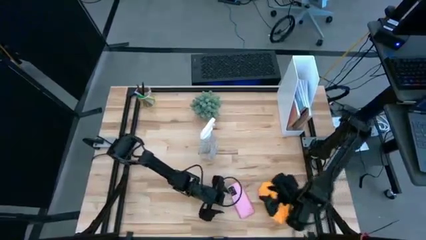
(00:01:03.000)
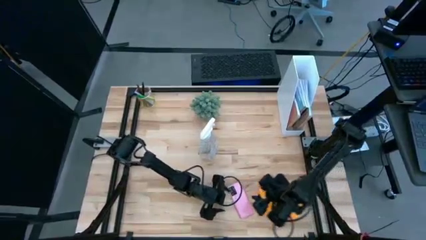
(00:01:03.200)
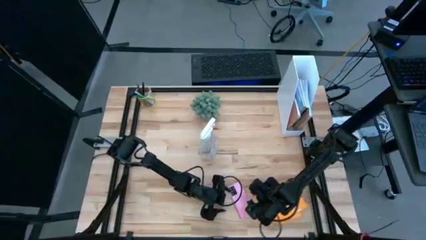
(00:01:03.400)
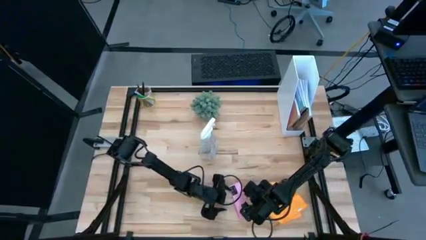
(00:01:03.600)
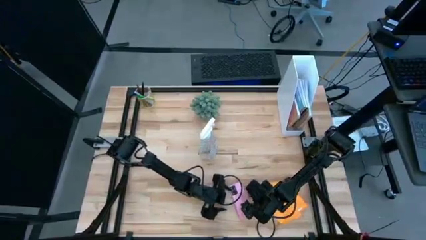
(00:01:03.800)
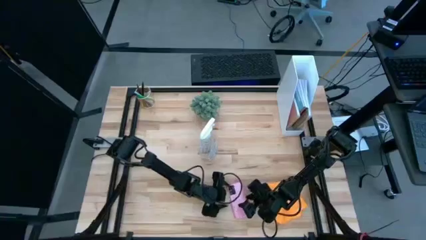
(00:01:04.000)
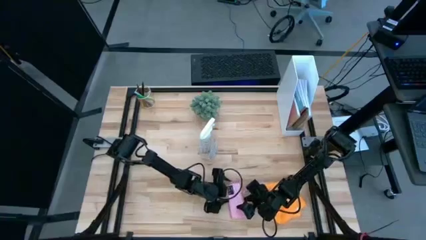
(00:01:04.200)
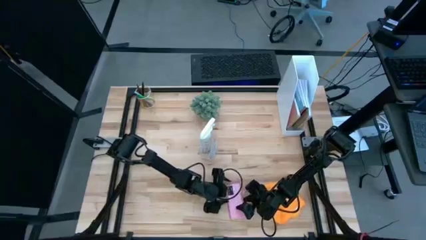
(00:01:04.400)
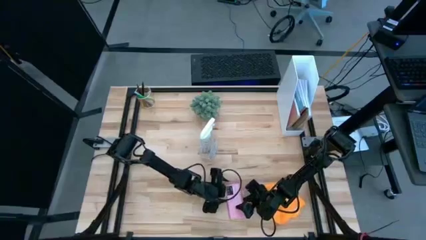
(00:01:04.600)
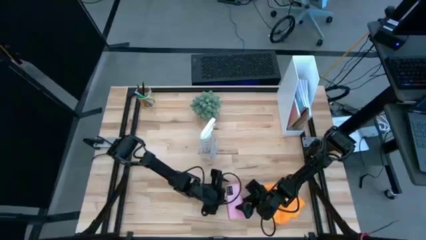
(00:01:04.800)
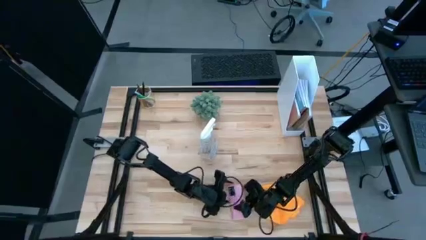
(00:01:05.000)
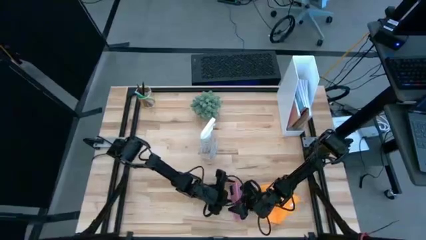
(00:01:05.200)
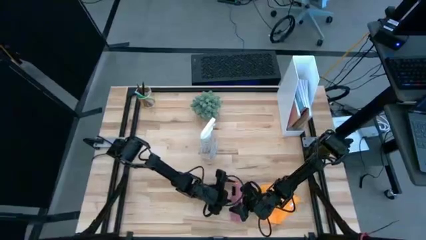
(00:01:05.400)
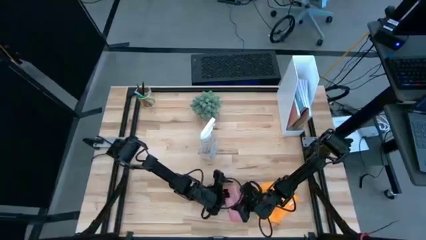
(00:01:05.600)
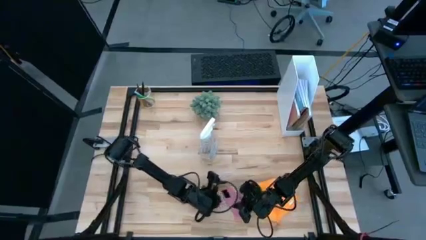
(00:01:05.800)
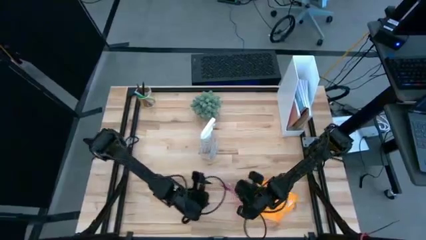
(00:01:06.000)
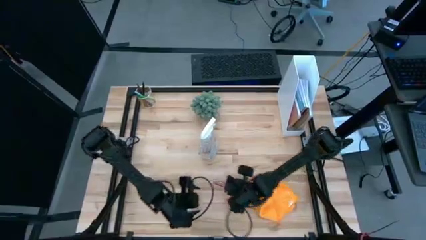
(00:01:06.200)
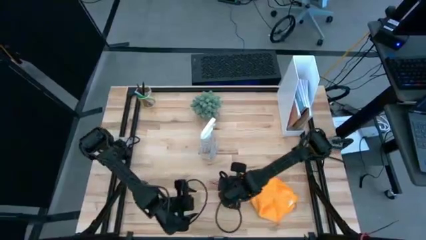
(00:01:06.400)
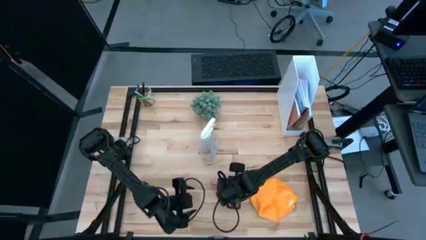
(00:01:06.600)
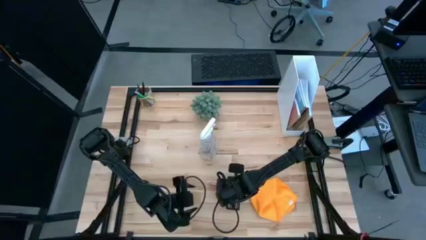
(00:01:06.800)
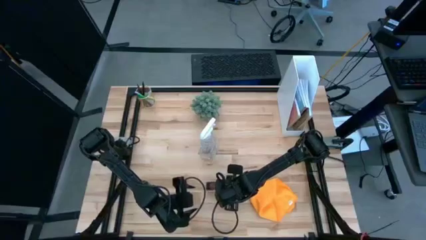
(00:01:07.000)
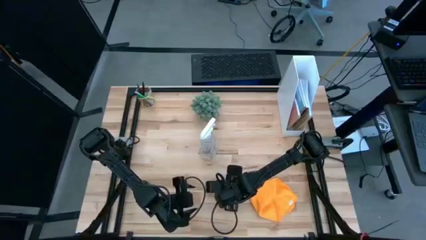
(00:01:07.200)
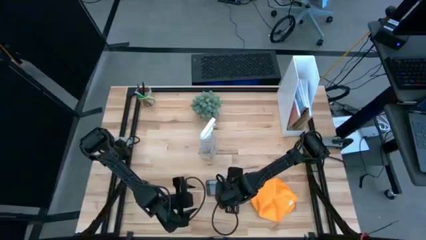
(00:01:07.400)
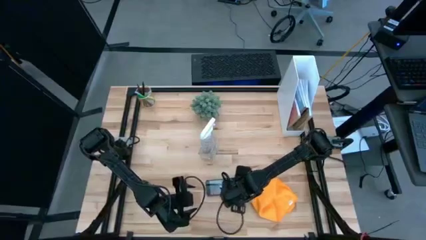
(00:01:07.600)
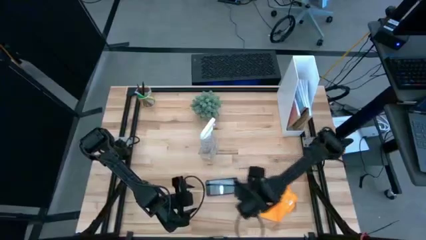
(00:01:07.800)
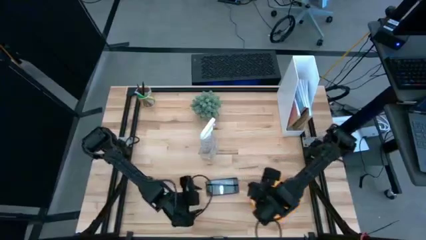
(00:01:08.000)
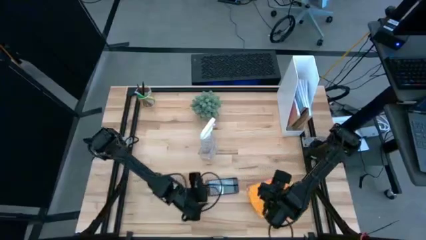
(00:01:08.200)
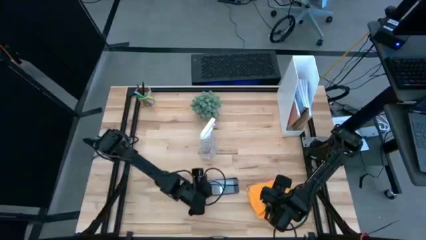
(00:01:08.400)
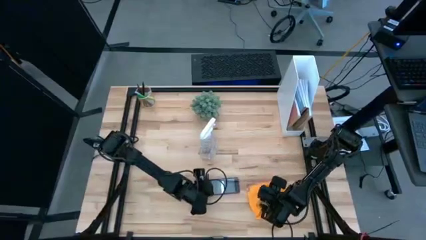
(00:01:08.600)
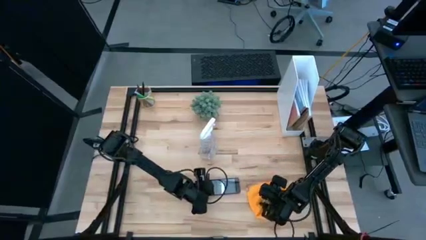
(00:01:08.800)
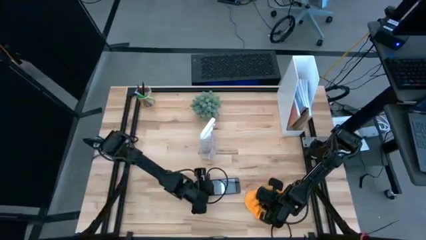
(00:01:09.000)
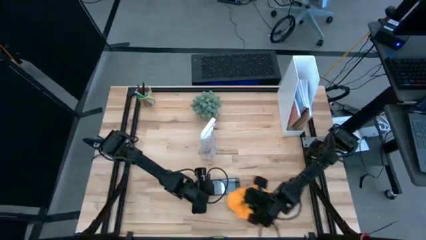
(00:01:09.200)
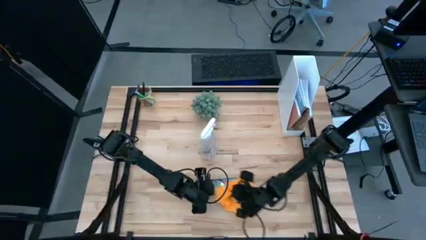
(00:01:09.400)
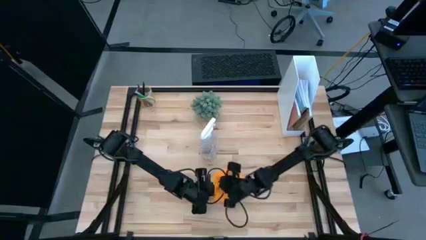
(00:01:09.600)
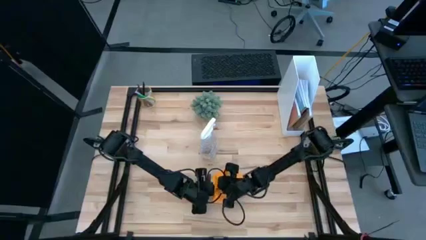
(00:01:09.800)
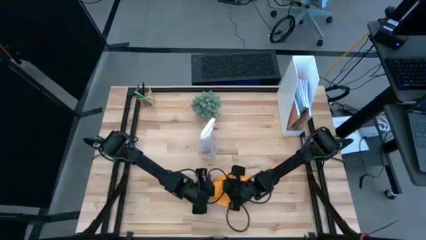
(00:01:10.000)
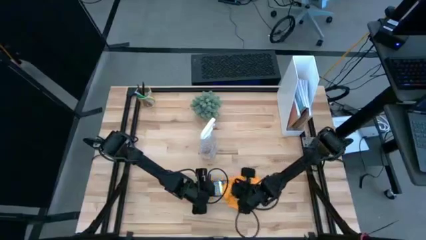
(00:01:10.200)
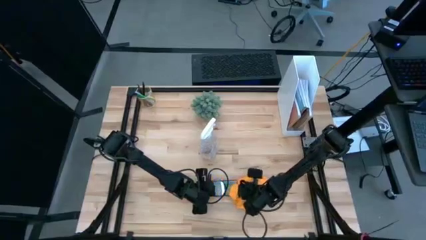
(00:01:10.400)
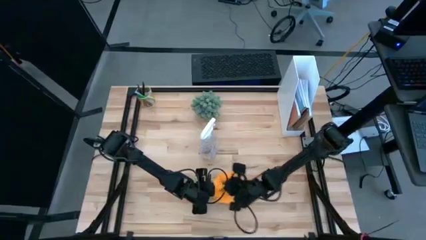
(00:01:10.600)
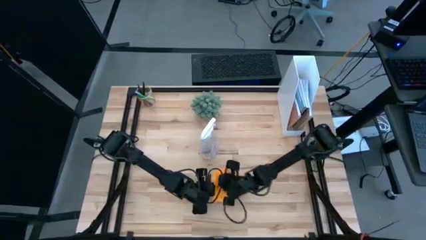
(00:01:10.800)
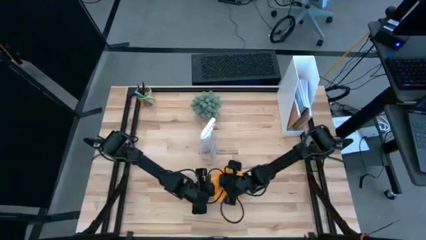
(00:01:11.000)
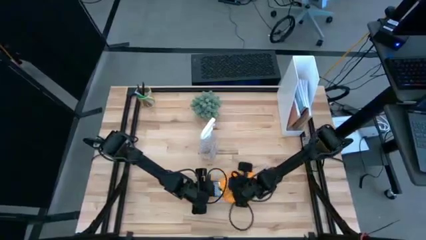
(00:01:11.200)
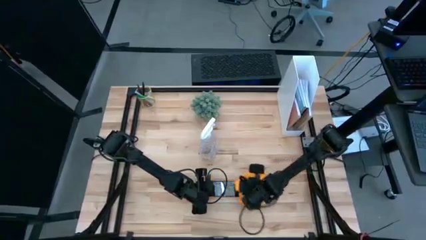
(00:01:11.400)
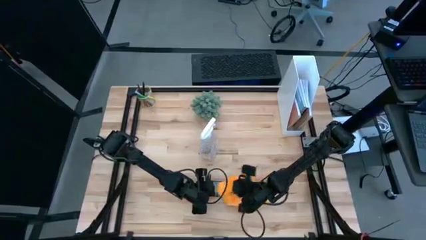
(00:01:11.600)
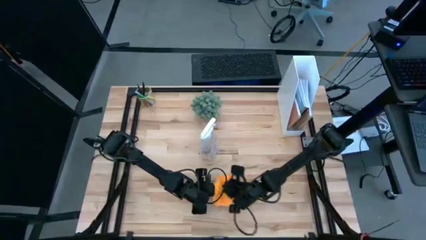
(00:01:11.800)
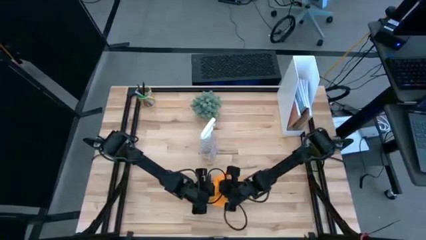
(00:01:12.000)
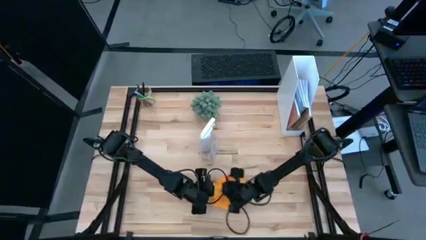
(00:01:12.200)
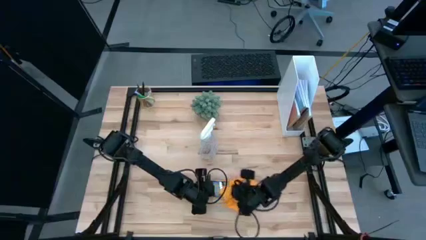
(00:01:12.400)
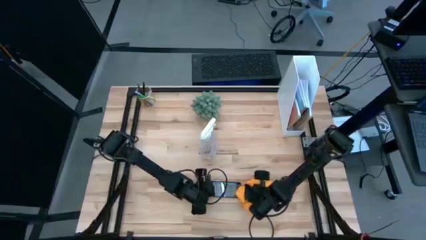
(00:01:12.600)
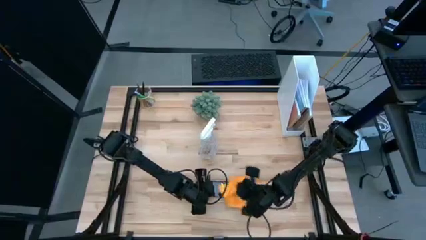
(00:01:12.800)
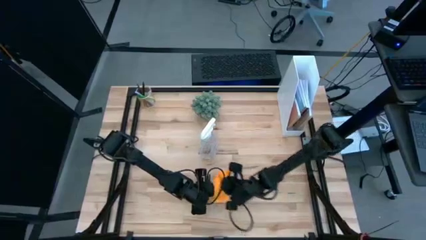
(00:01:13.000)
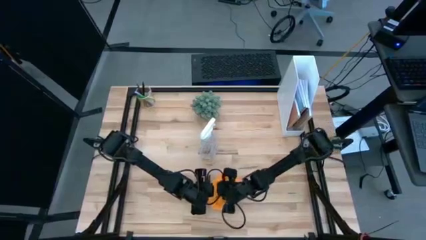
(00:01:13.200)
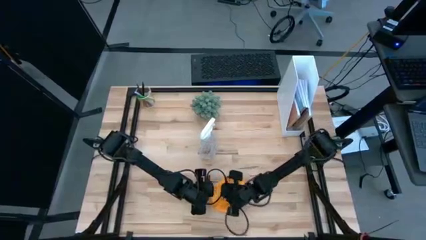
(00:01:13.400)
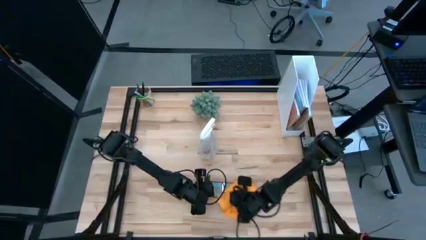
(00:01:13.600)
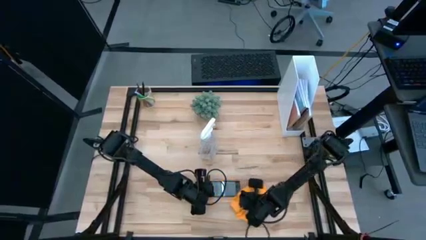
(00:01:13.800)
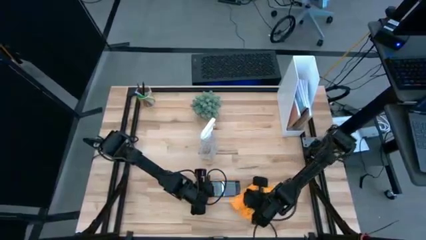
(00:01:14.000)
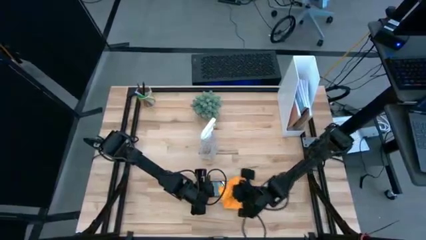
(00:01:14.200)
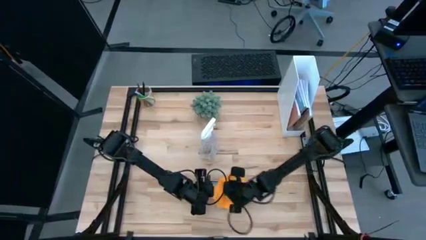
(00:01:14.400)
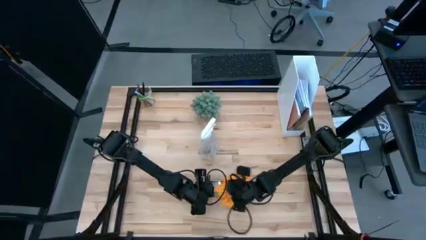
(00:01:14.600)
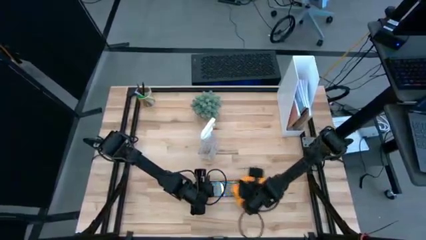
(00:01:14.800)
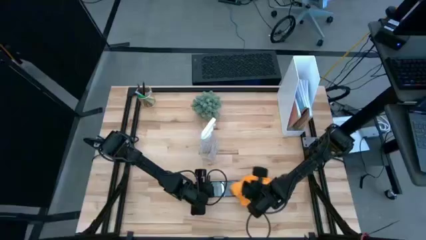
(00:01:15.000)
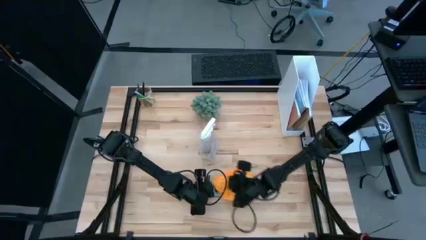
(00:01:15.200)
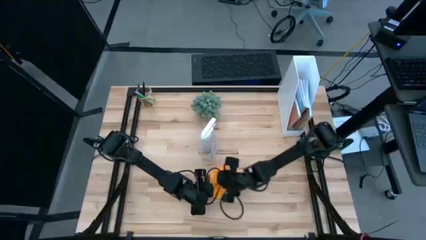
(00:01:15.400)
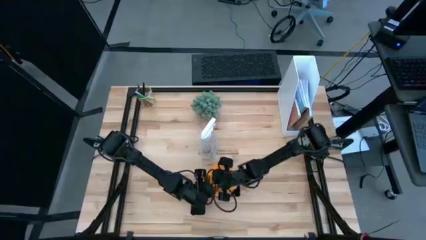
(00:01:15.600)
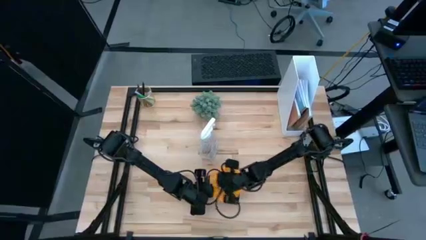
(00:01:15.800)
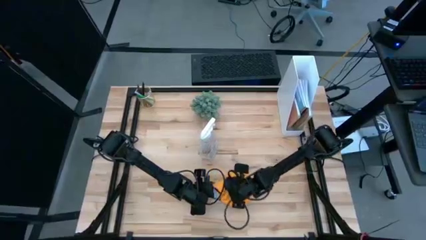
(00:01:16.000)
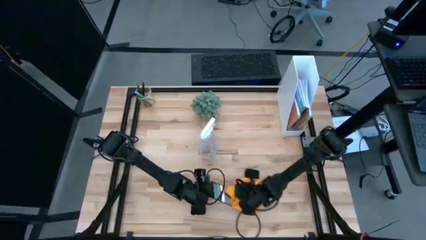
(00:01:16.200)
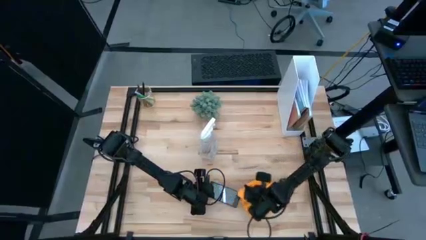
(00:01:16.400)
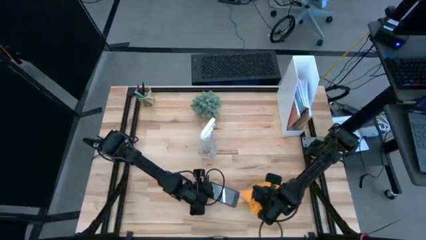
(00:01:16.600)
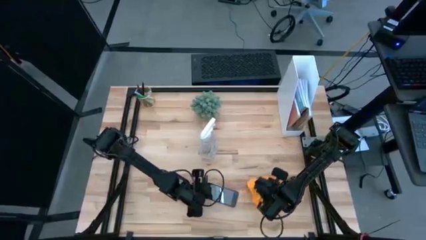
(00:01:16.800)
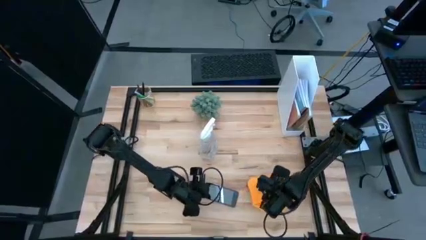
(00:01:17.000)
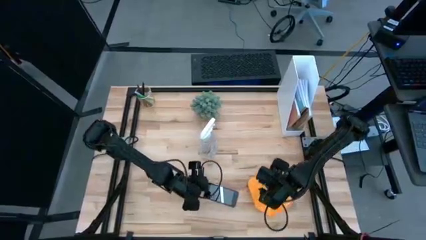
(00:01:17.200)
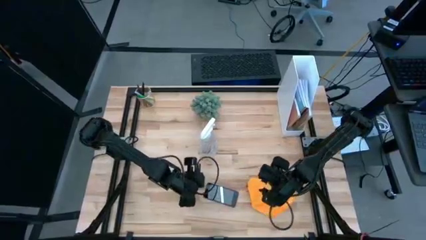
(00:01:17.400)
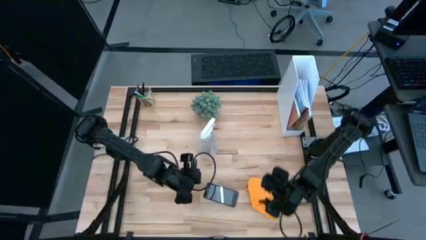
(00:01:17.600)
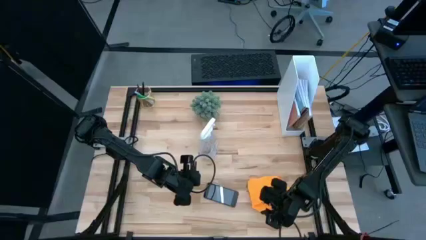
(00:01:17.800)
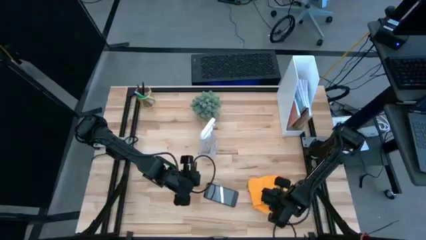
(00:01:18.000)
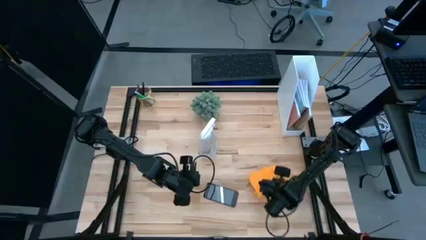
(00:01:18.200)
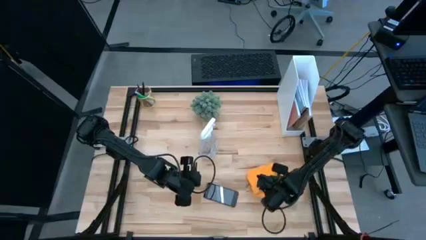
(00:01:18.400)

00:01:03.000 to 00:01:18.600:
Task: Apply microfiber cloth
Wipe the front of the pink phone with the orange microfiber cloth
